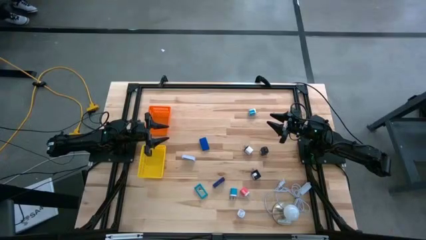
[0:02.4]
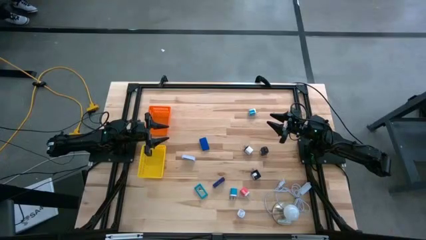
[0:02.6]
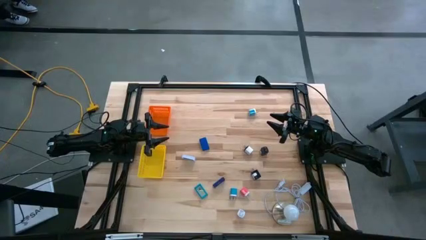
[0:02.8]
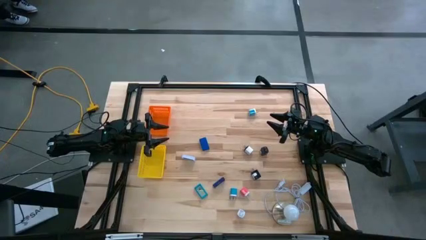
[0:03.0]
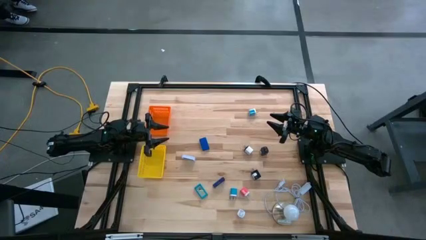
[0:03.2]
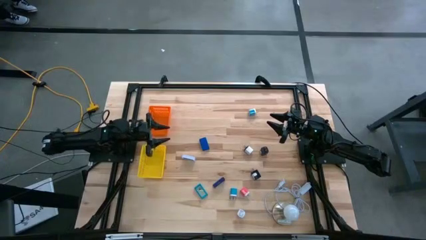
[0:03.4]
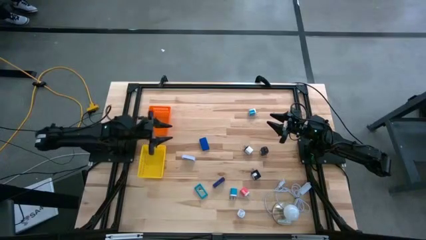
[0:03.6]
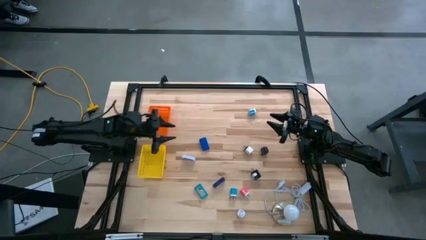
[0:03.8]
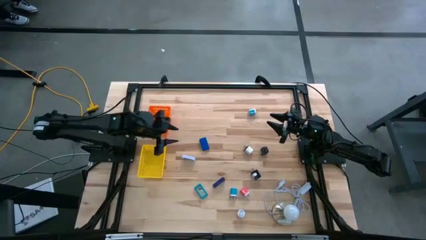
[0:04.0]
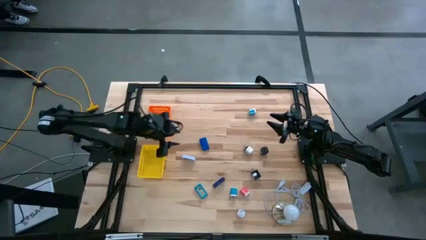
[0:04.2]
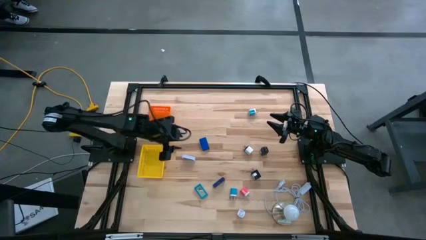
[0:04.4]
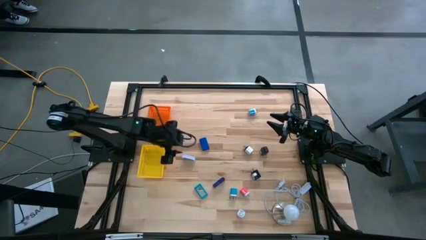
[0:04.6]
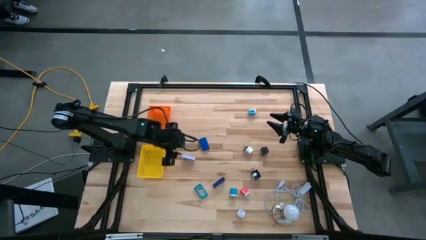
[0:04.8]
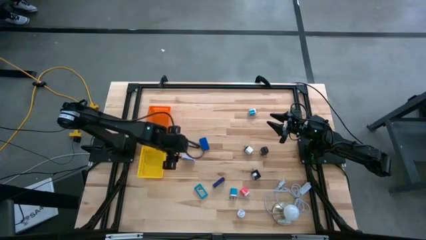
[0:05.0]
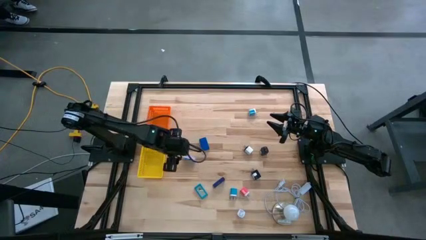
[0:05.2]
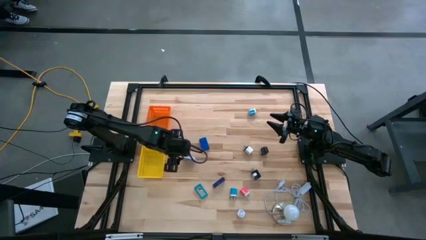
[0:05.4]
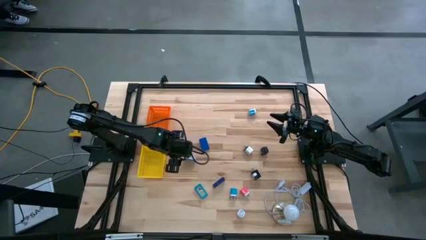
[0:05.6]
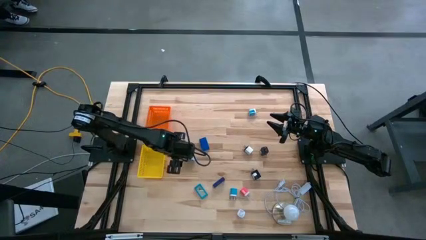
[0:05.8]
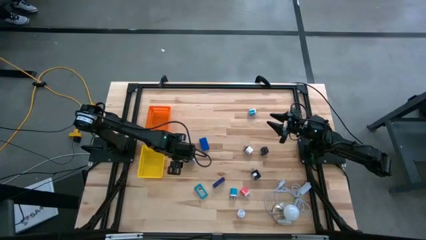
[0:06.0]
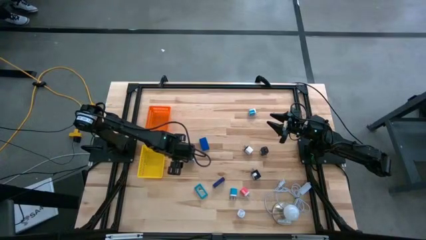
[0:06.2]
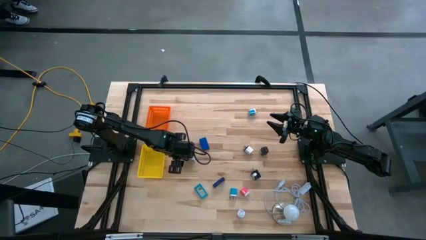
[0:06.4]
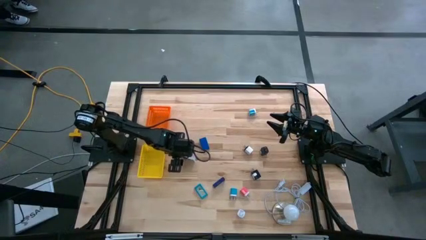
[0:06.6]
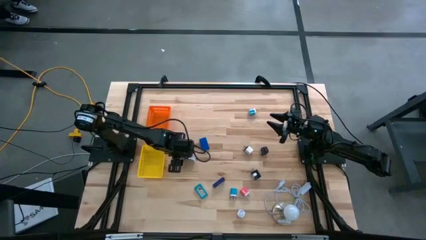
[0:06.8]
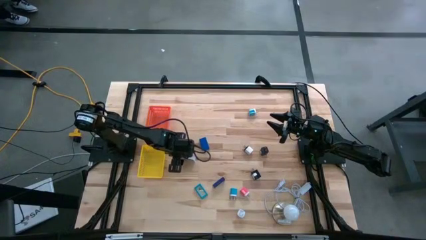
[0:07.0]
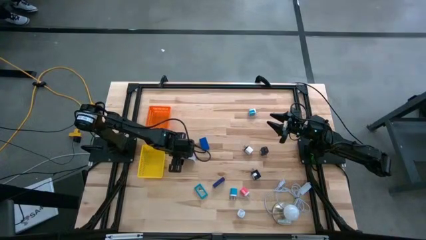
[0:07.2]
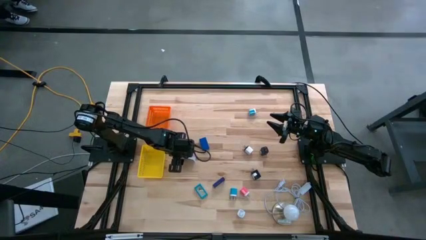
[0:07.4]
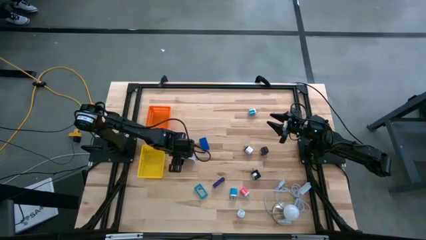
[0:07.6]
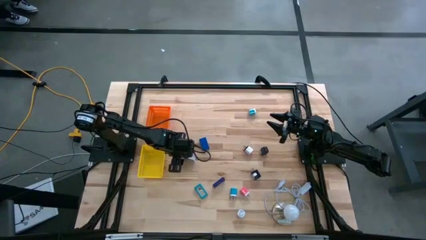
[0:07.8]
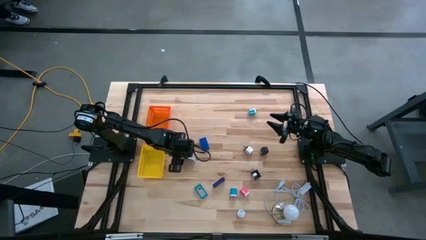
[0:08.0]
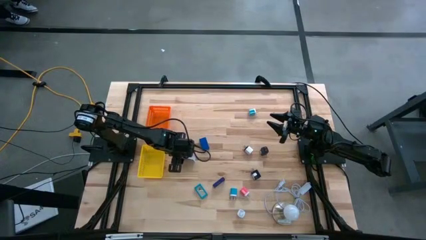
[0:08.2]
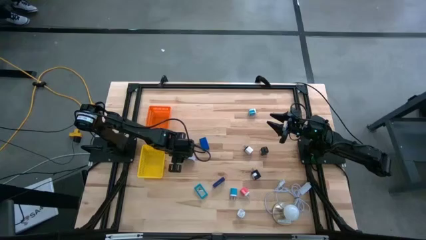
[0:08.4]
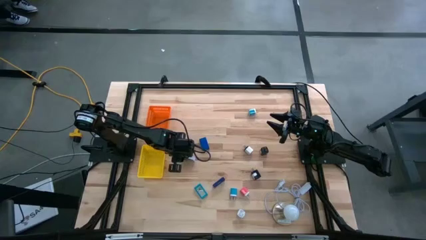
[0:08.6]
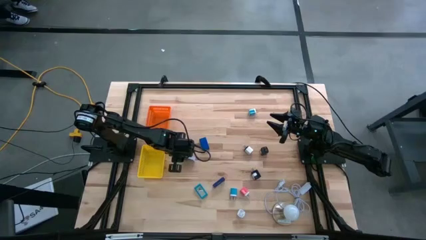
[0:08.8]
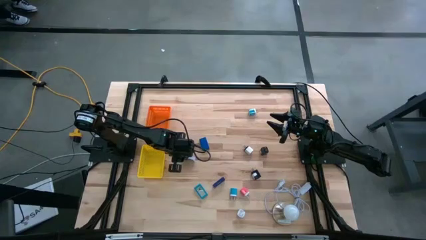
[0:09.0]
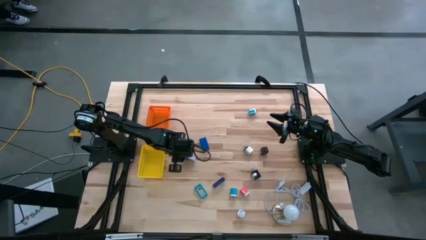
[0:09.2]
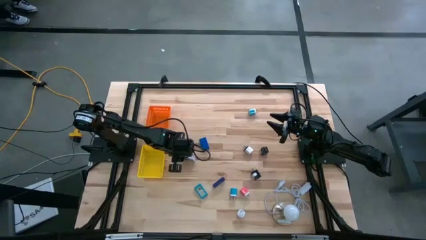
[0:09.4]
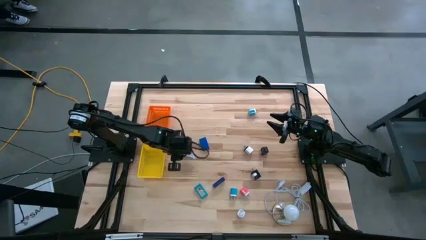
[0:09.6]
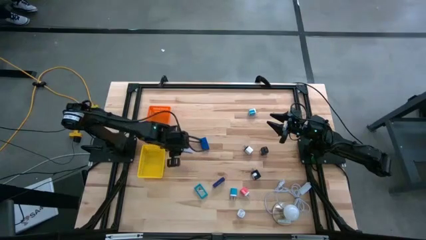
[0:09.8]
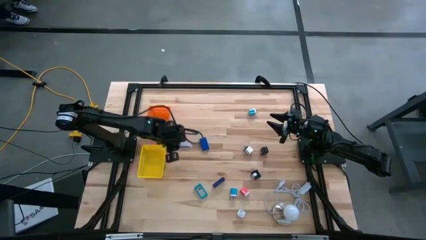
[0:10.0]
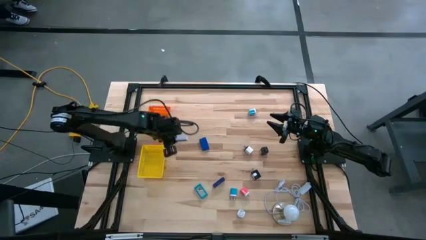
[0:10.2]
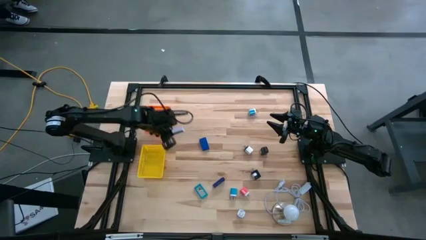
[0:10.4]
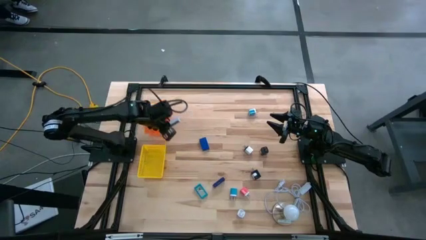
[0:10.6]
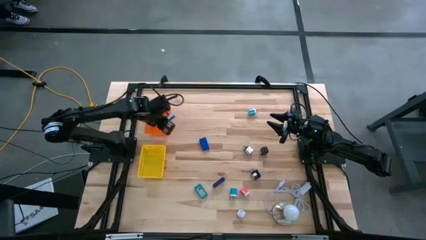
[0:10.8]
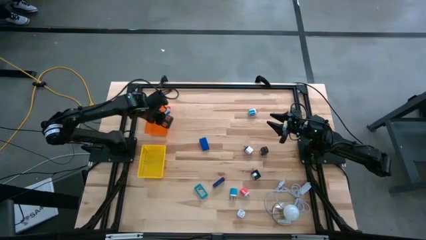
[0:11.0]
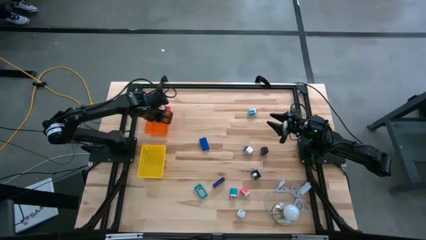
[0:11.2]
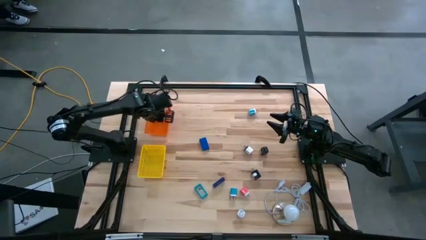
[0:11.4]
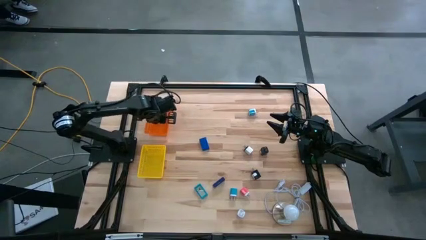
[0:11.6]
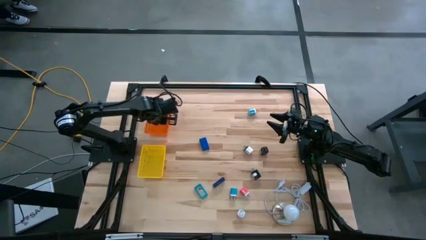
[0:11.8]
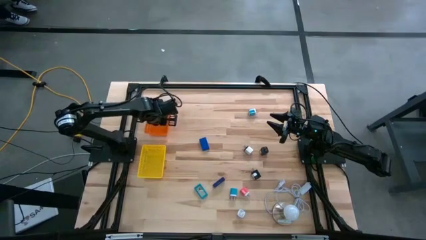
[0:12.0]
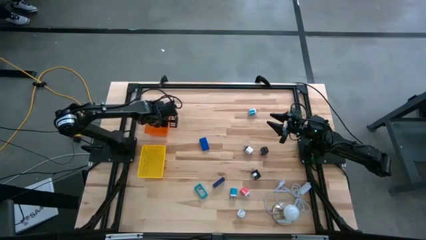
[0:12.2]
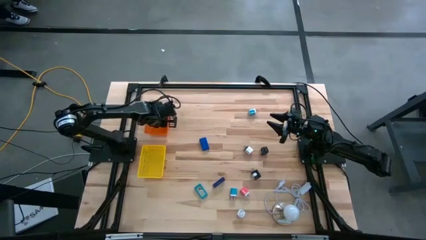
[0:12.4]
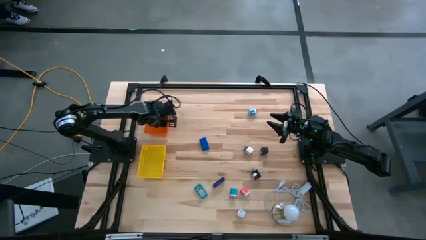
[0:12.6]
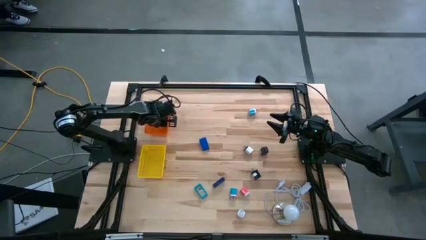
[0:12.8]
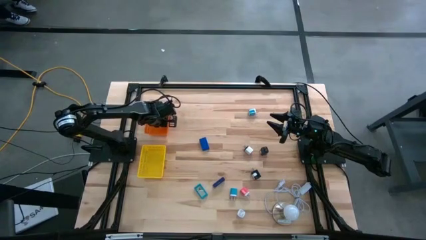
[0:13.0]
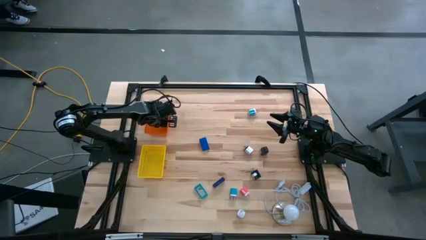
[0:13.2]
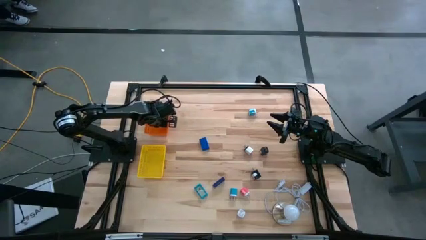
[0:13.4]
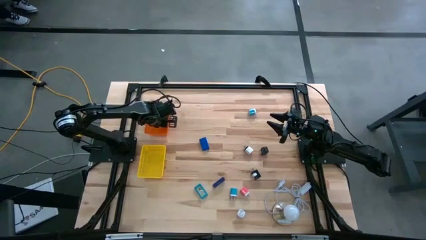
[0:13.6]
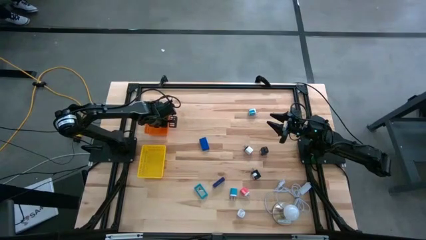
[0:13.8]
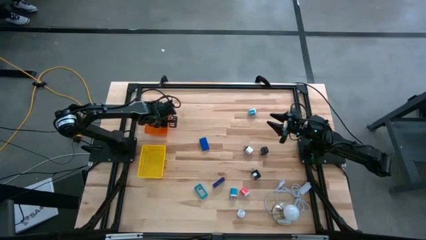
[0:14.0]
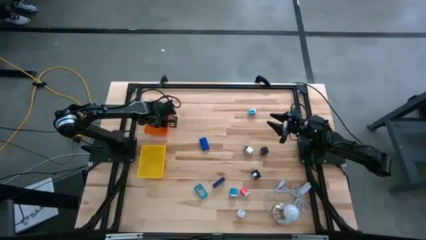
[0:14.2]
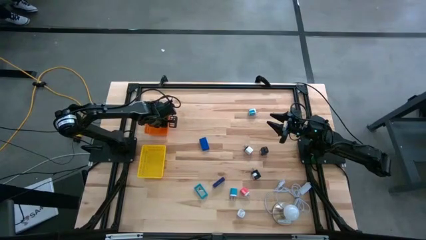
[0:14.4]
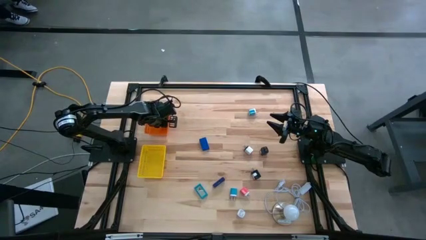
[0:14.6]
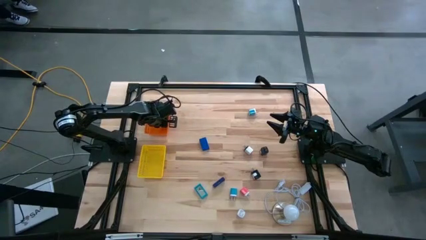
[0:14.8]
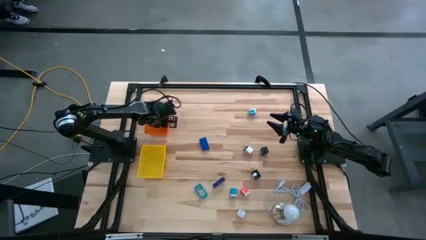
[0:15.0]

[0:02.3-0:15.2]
Task: Pick & Place Office items
Put the white timer into the orange basket
